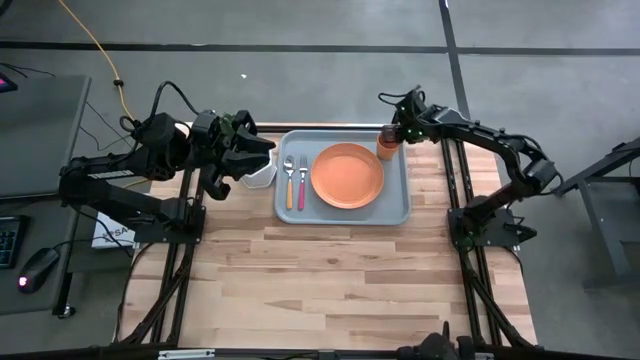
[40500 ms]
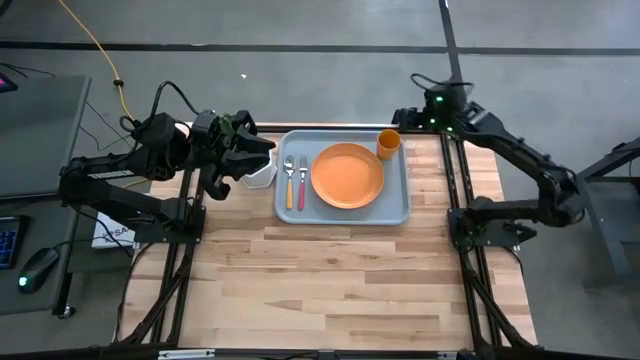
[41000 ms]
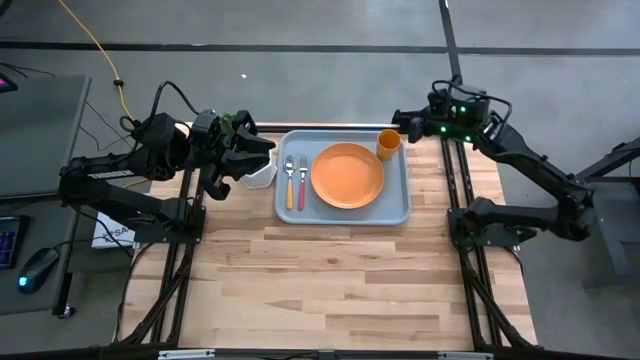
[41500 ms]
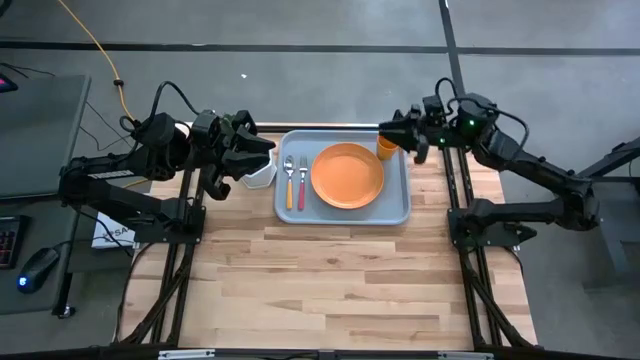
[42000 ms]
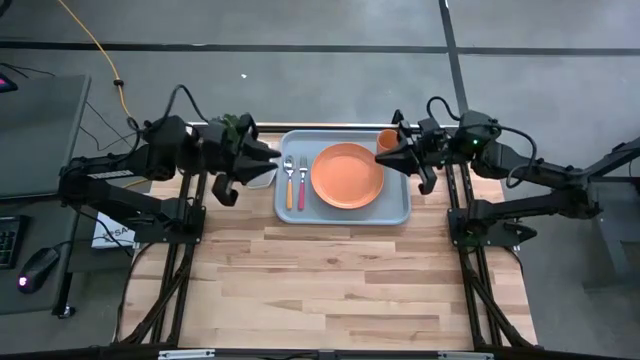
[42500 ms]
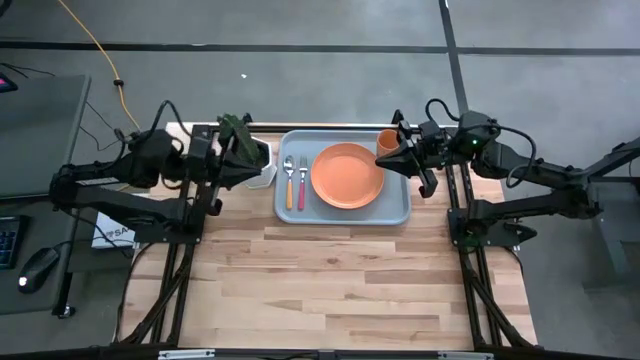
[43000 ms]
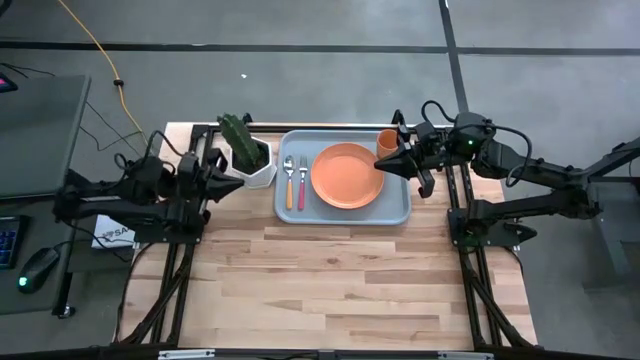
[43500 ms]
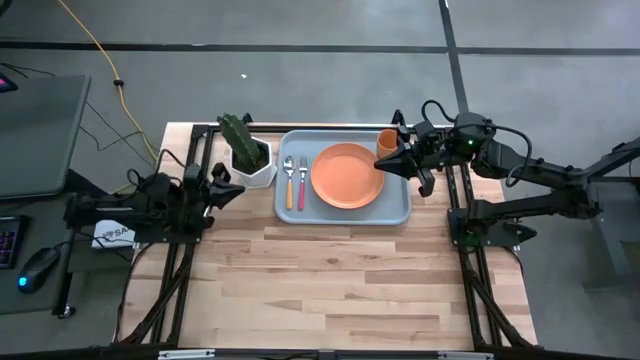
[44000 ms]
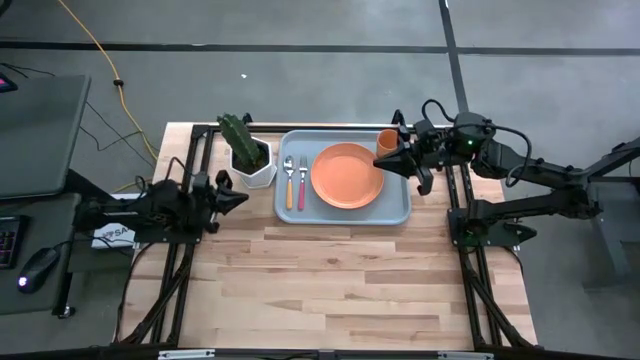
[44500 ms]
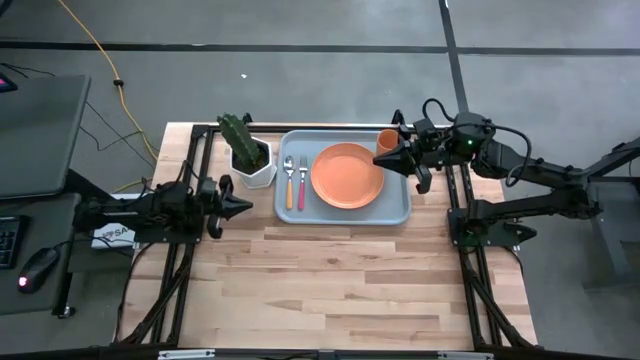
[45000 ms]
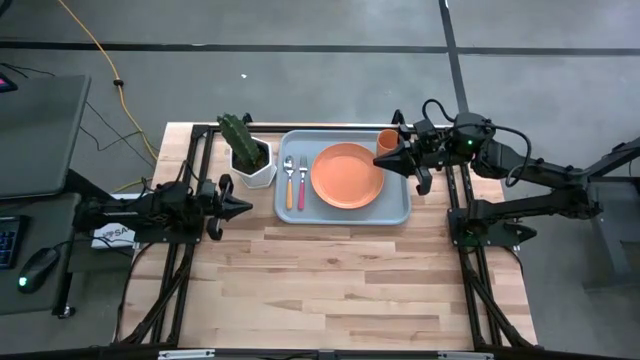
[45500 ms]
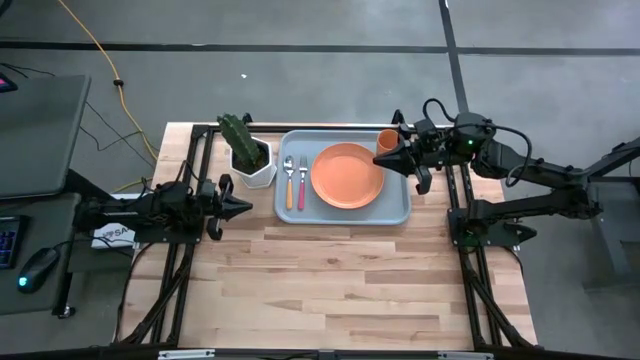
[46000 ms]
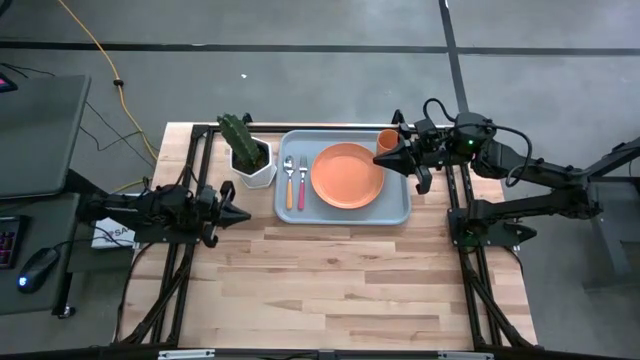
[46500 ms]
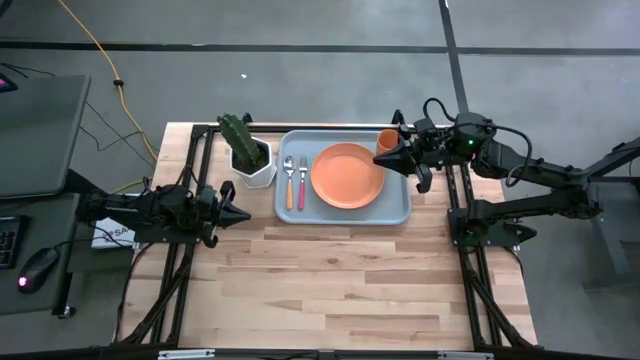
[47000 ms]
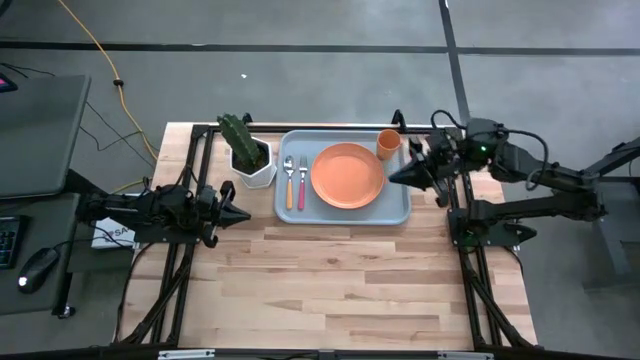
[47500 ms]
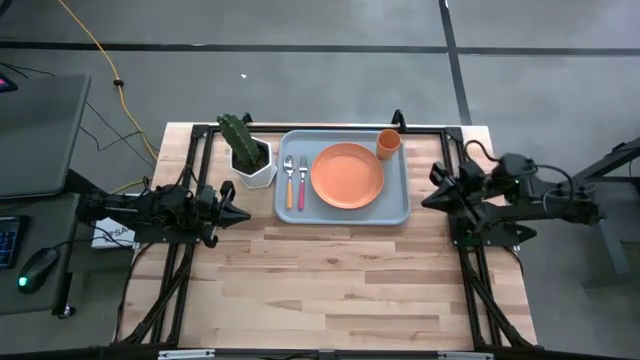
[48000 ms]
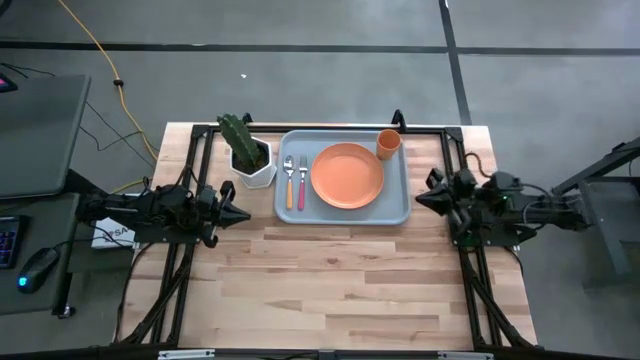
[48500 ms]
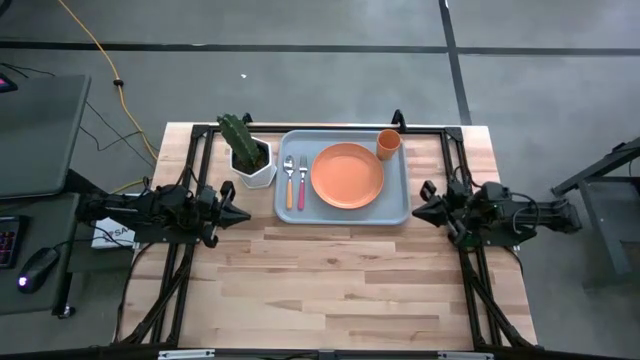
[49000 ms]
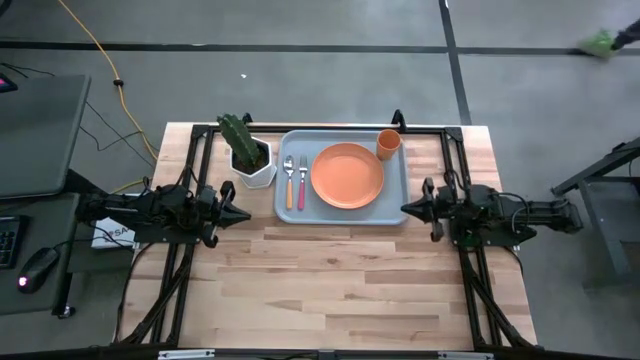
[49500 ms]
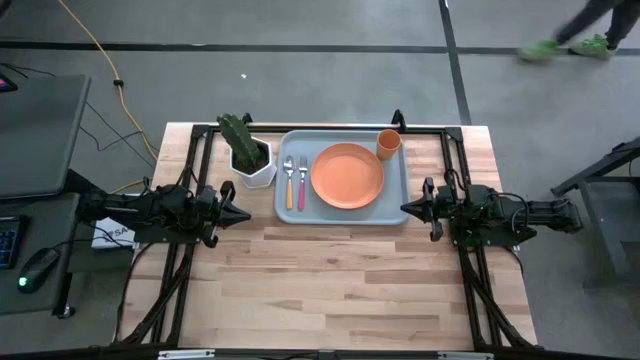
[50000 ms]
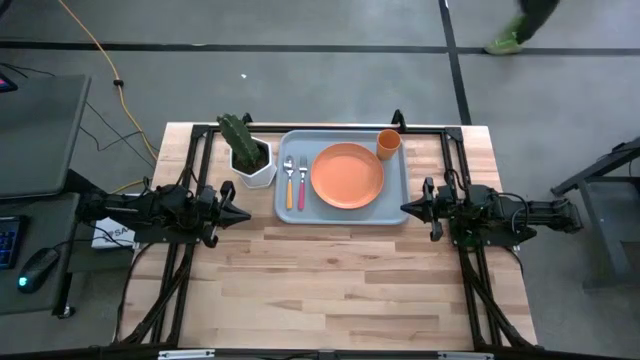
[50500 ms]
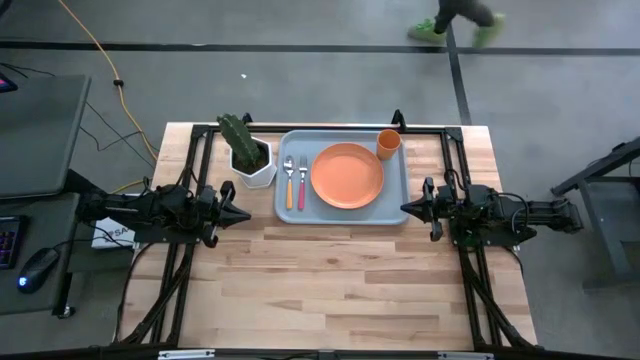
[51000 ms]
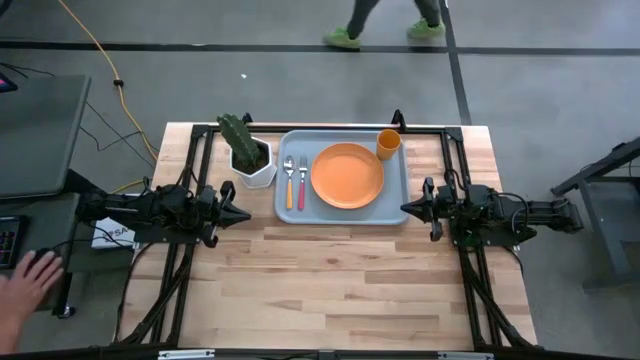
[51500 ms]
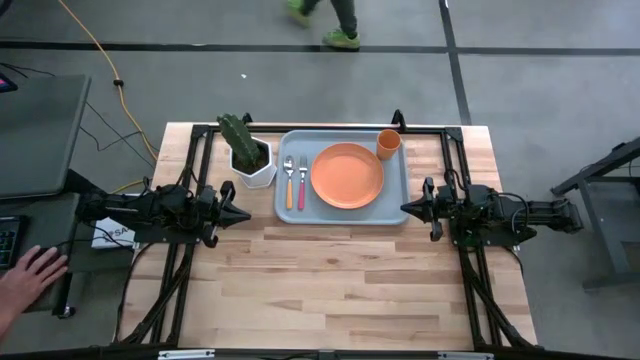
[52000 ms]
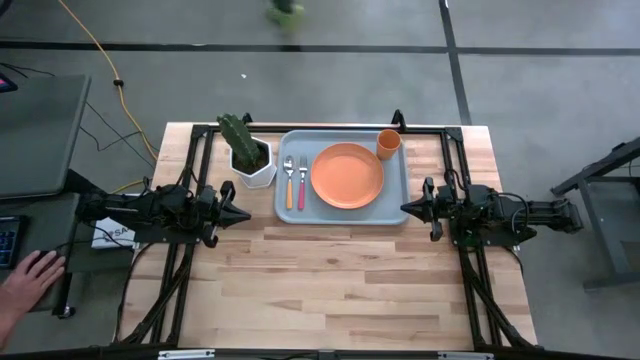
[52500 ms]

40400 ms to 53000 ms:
Task: Pick and place plate/cup/fork/spoon on tray
Return to Home Position

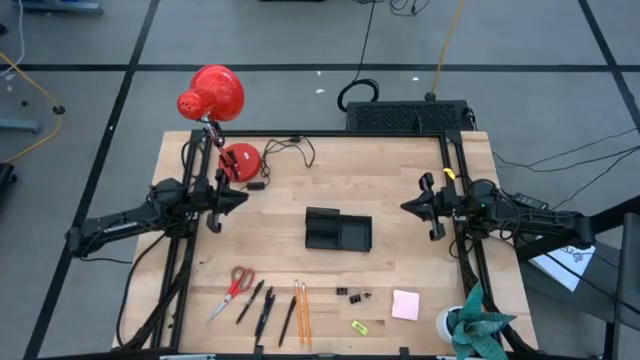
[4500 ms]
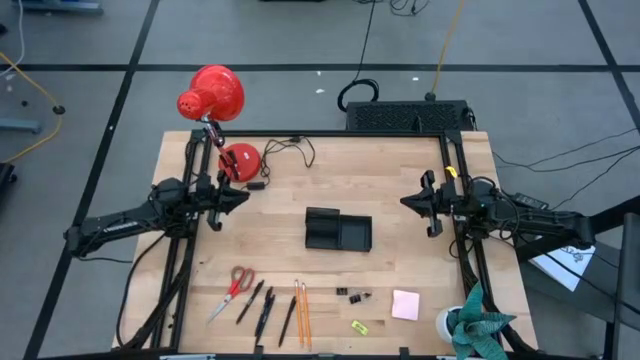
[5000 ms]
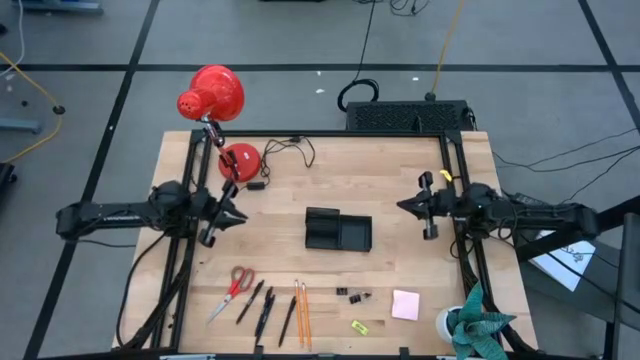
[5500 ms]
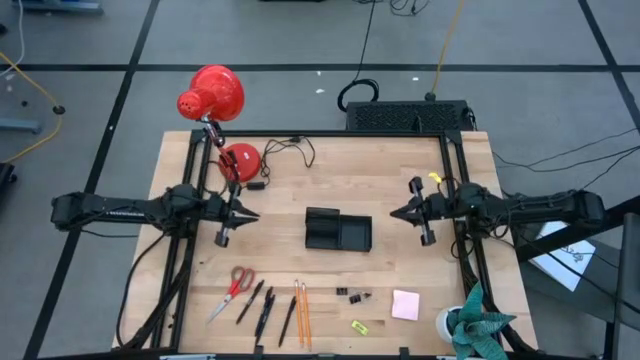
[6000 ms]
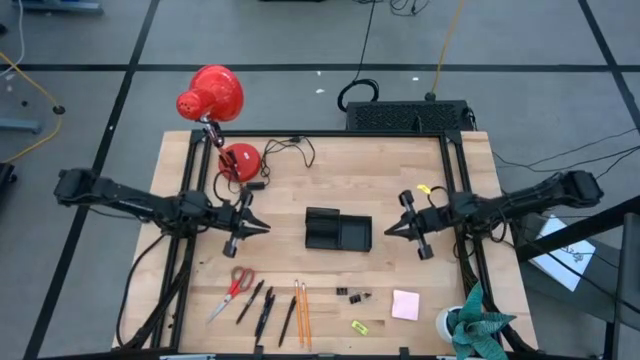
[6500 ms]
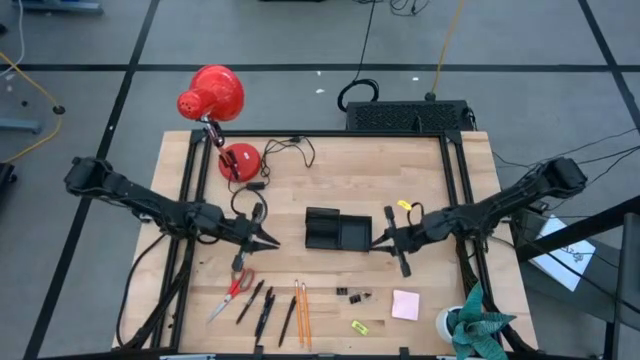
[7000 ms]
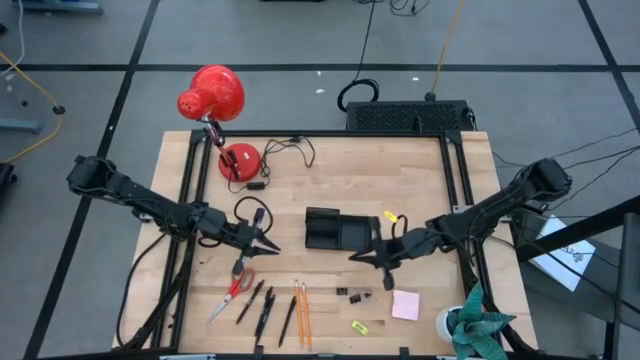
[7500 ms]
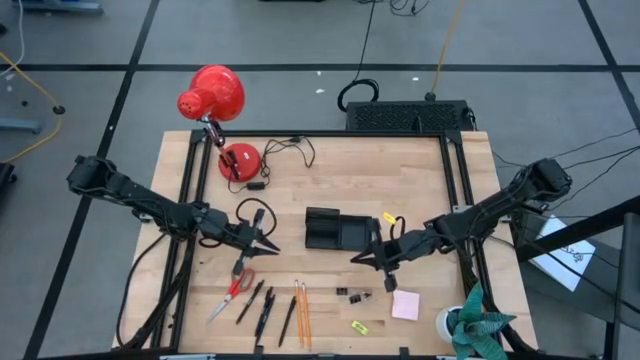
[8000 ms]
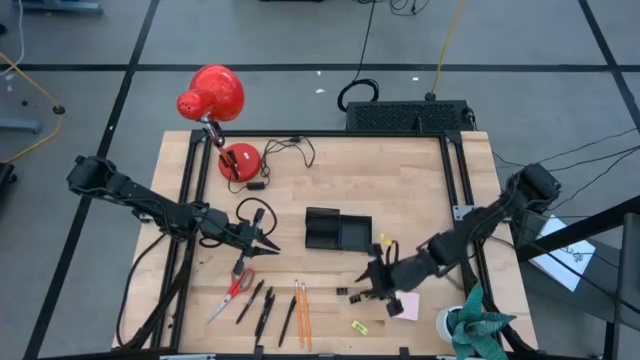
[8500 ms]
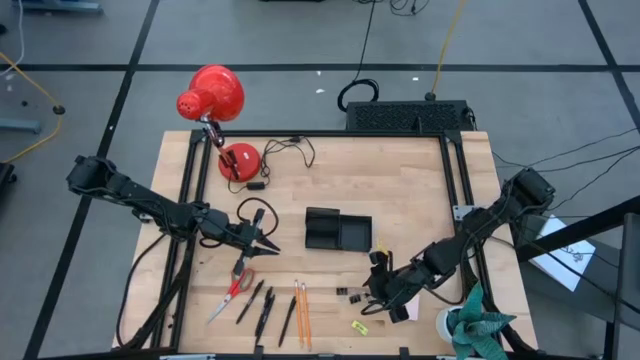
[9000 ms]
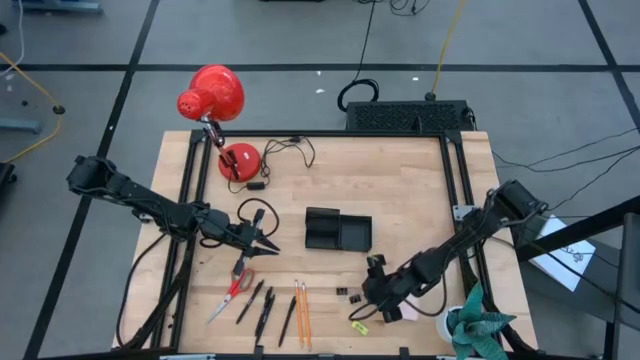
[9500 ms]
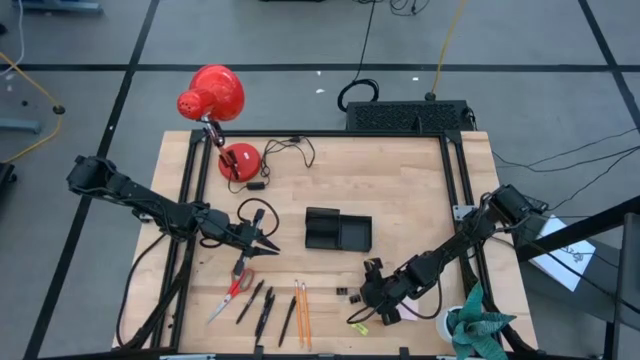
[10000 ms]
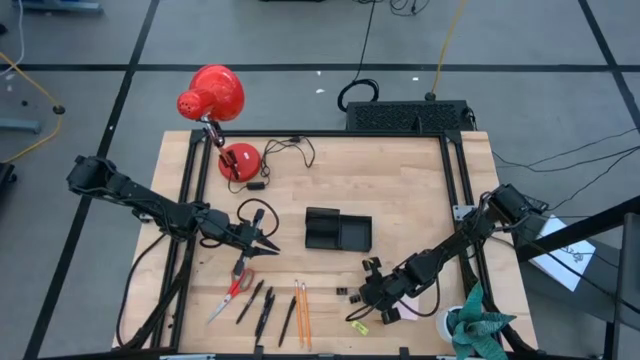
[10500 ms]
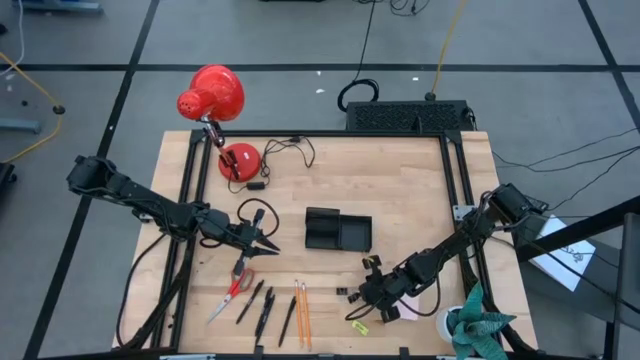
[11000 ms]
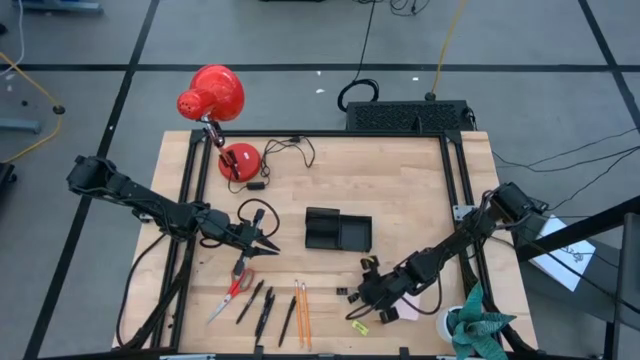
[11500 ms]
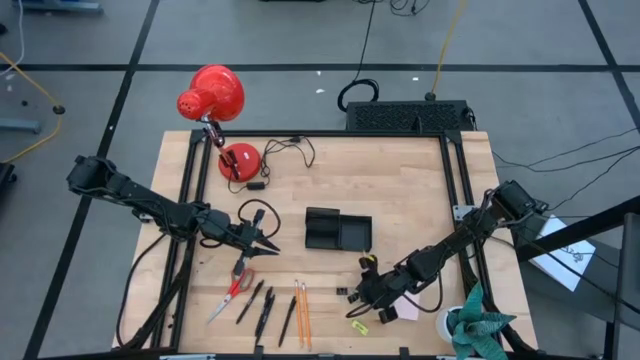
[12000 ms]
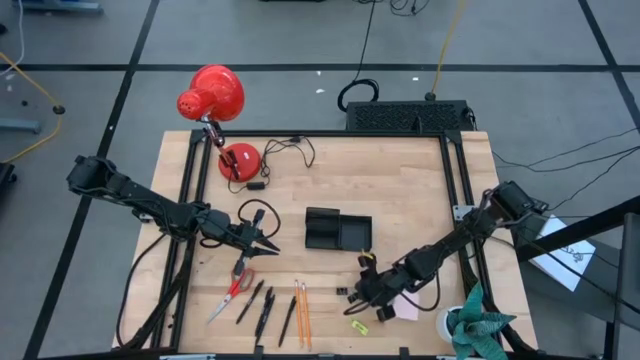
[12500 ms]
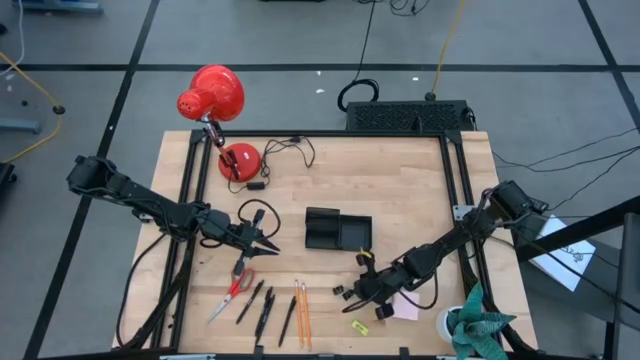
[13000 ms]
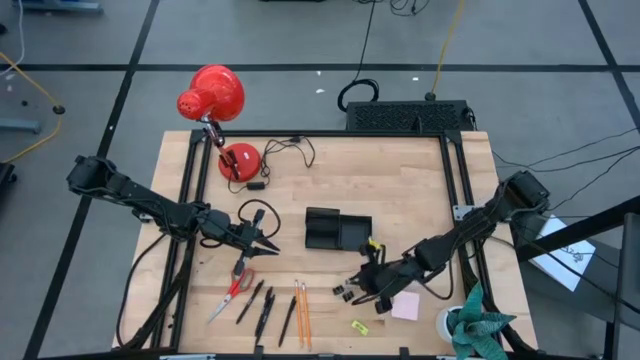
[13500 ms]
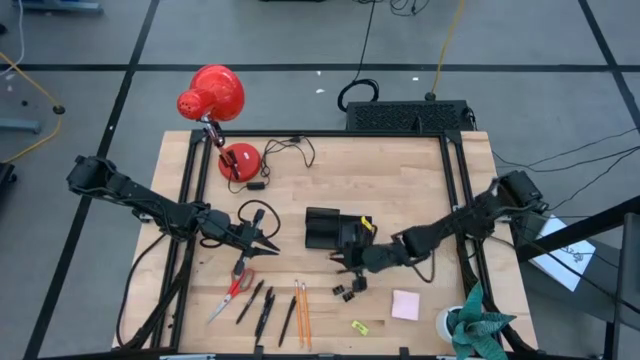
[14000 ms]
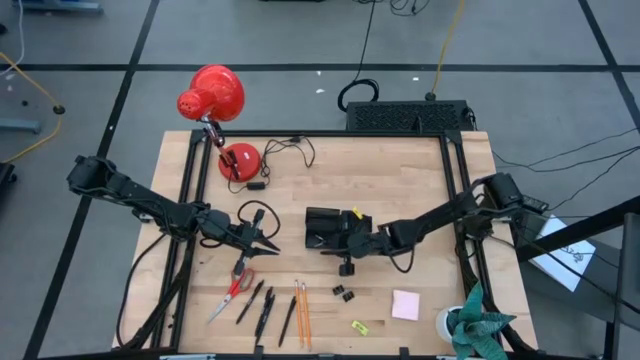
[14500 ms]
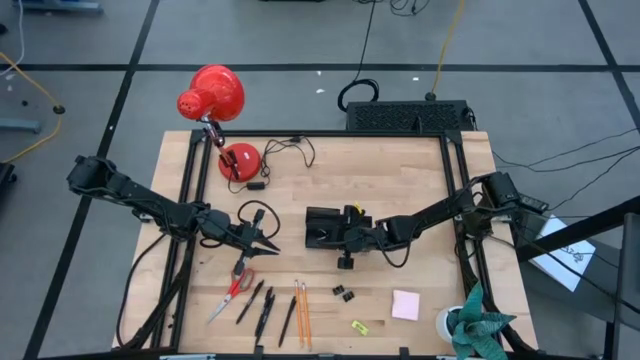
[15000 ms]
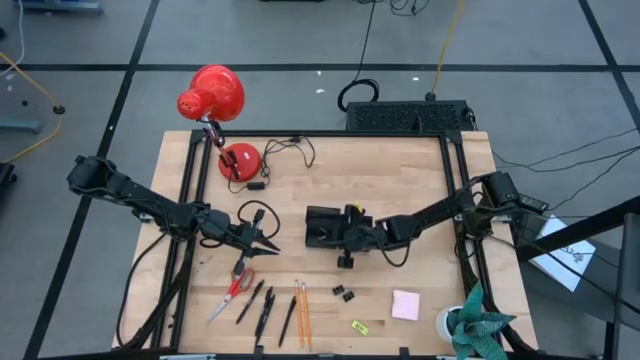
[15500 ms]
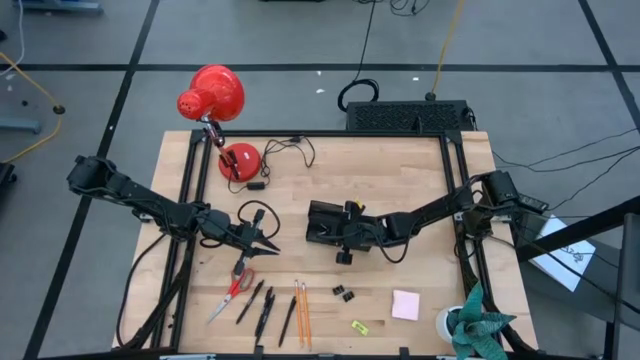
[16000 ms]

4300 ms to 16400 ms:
Task: Pick and place office supplies into organizer
Put the black binder clip into the black desk organizer
